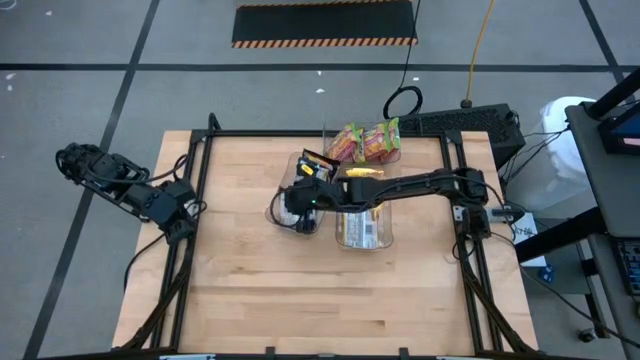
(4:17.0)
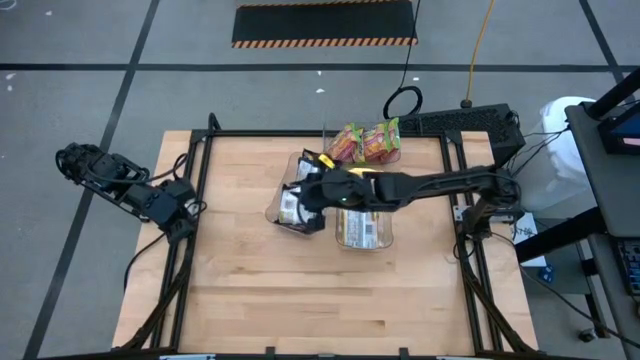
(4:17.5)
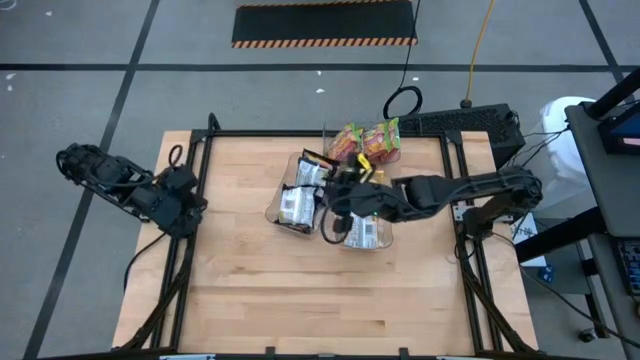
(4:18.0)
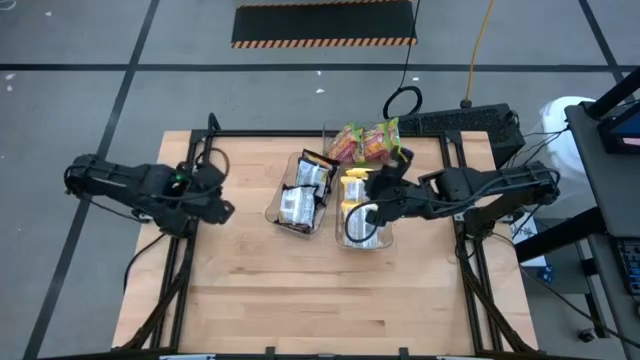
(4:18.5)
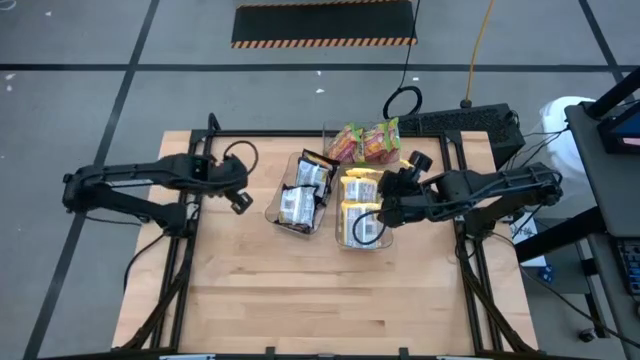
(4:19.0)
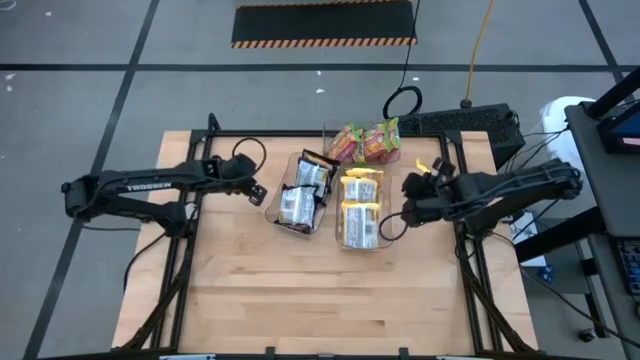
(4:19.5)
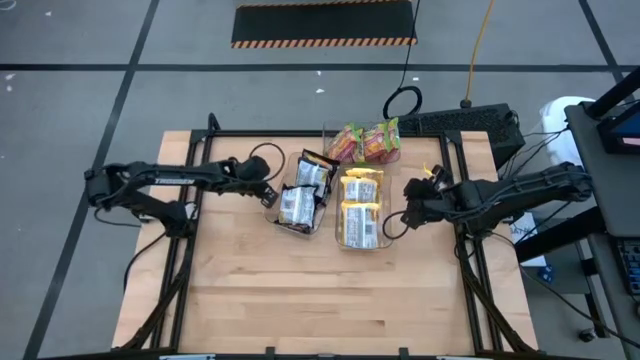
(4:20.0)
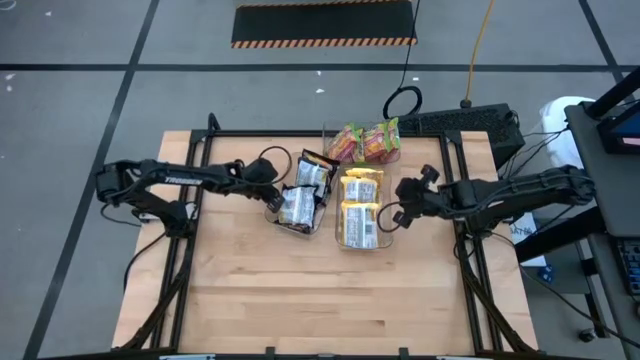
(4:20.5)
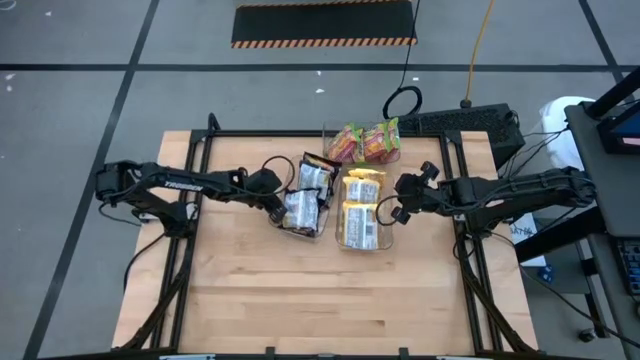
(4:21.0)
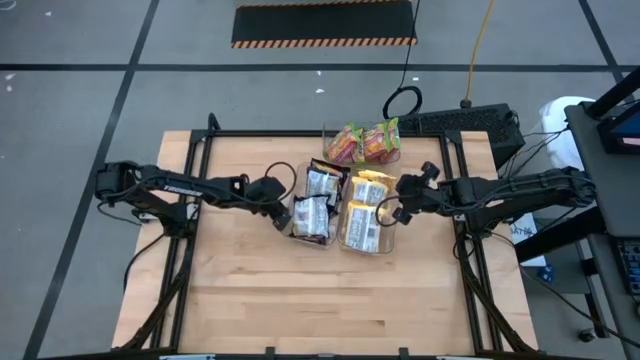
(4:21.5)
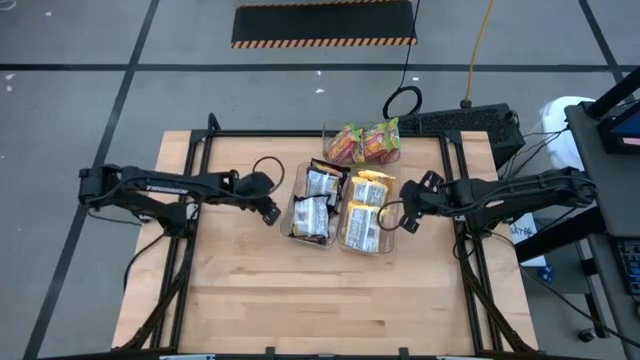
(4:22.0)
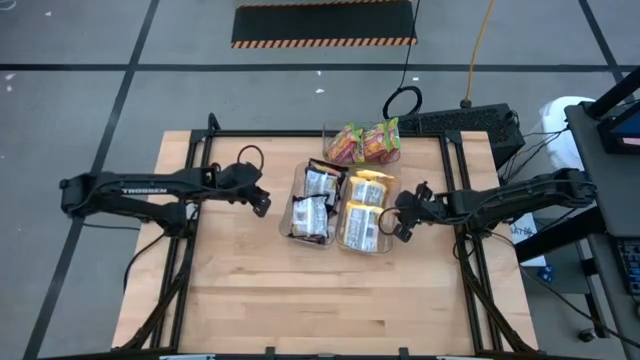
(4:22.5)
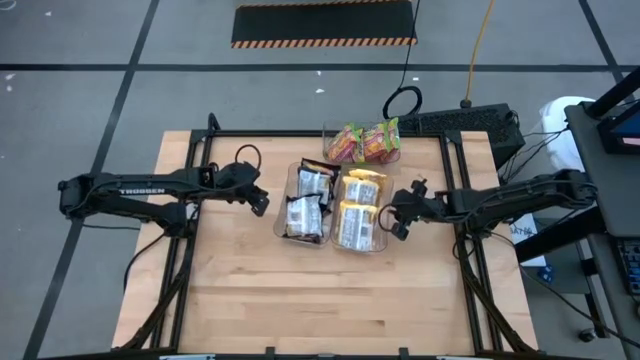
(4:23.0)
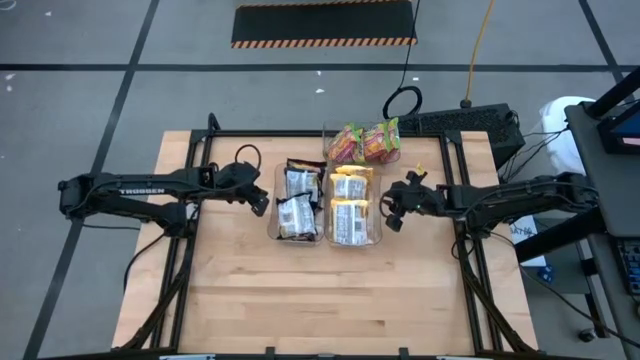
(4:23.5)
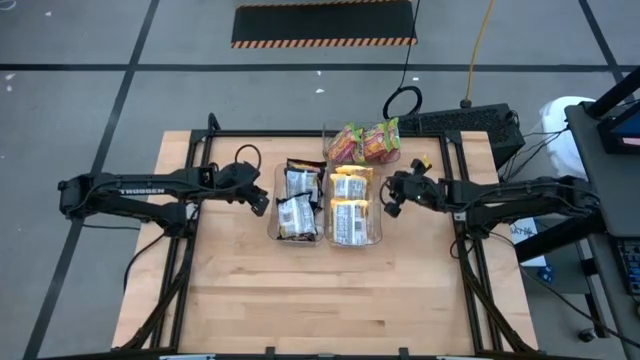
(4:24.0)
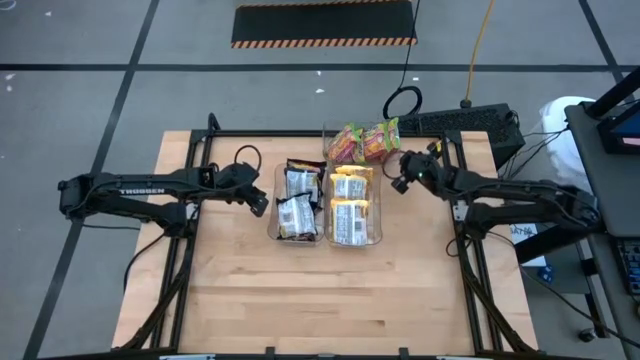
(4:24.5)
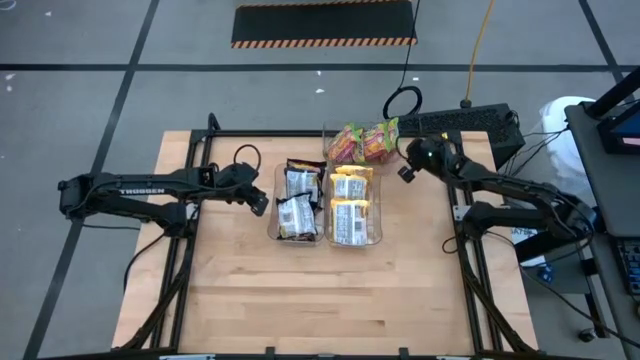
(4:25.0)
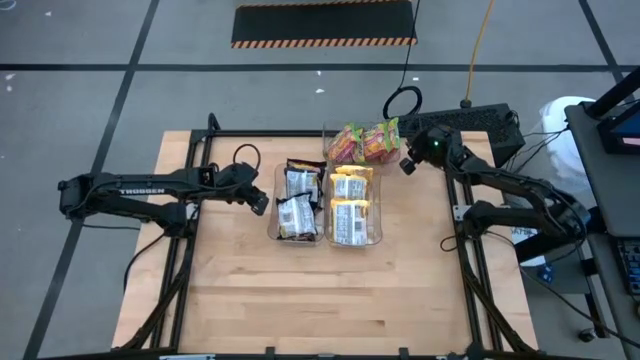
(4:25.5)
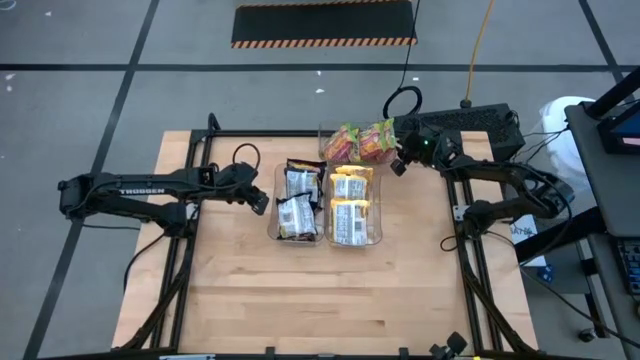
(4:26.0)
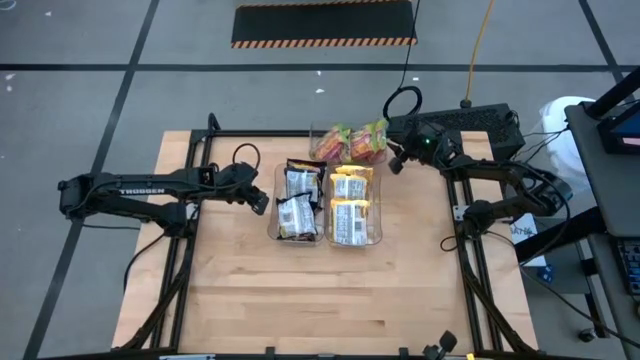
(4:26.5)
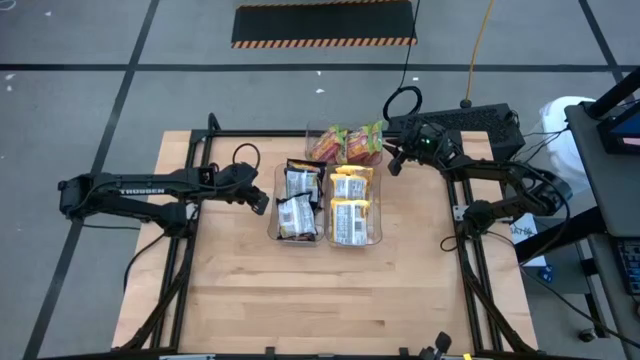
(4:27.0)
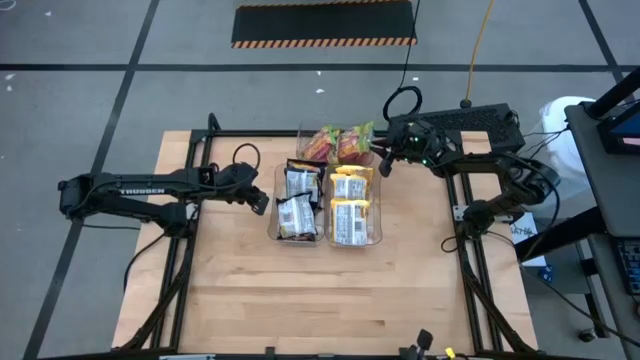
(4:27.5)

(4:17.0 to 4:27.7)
Task: Sort Maruchan noodles
Adjust the transparent bins on the shelf

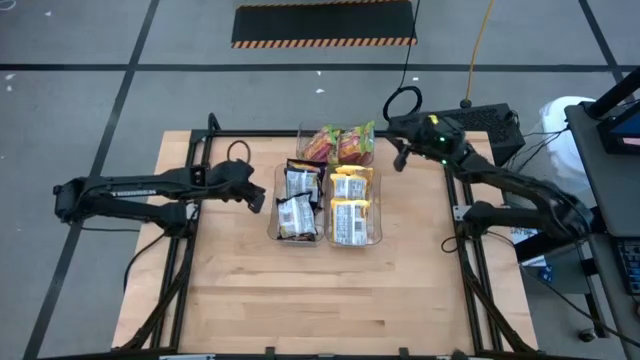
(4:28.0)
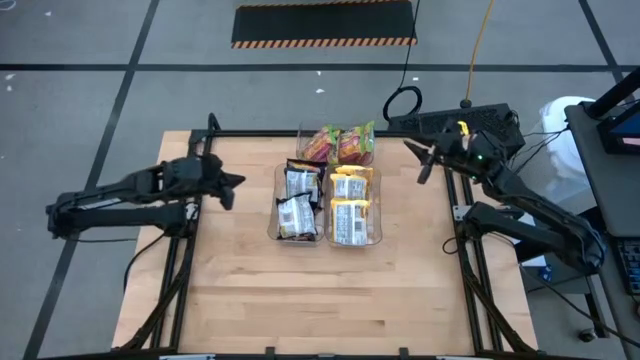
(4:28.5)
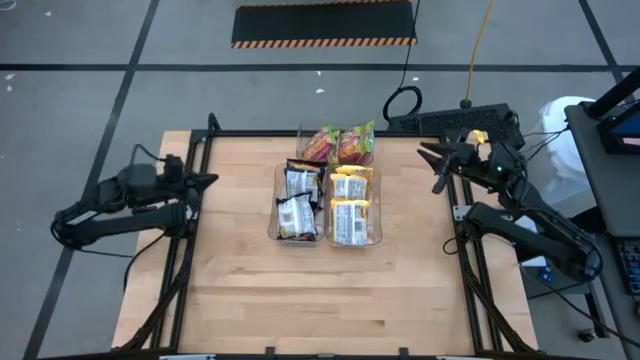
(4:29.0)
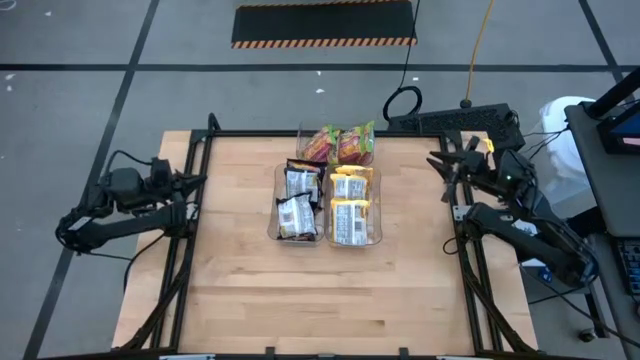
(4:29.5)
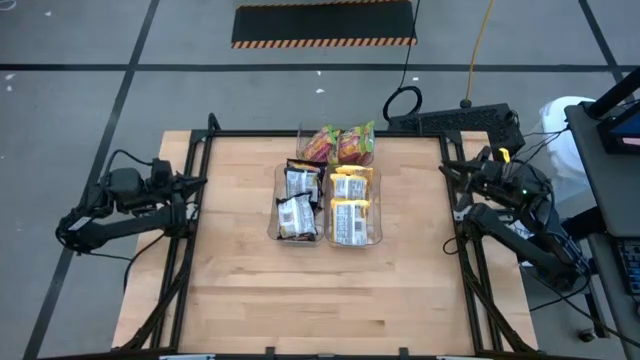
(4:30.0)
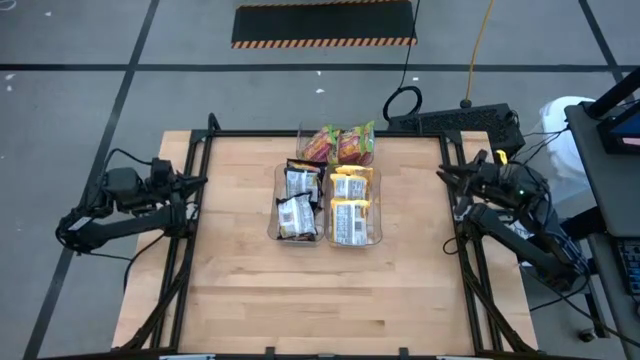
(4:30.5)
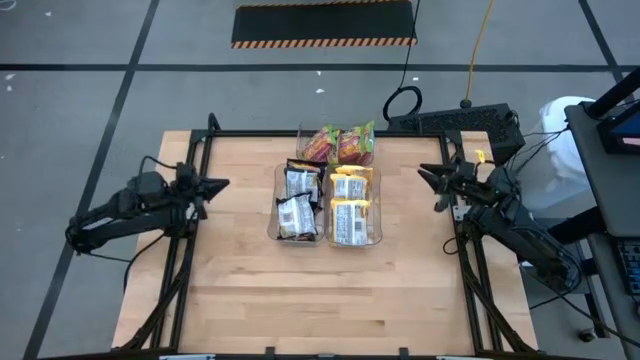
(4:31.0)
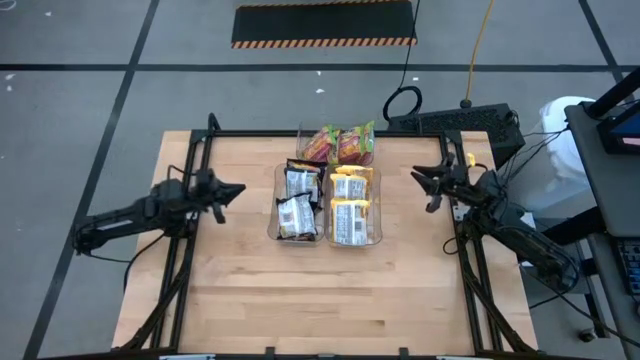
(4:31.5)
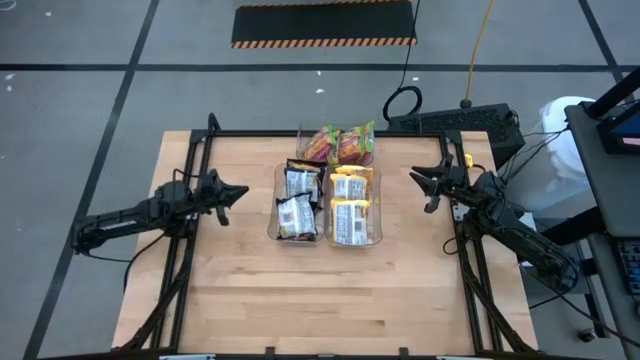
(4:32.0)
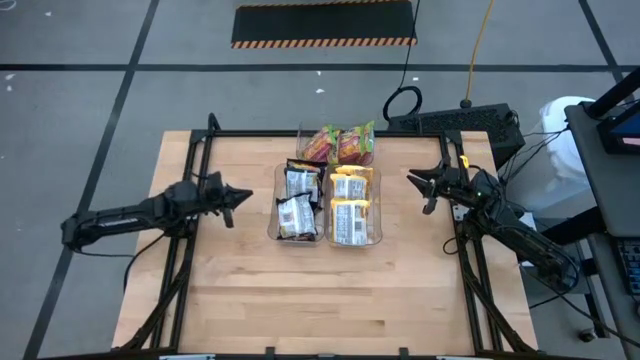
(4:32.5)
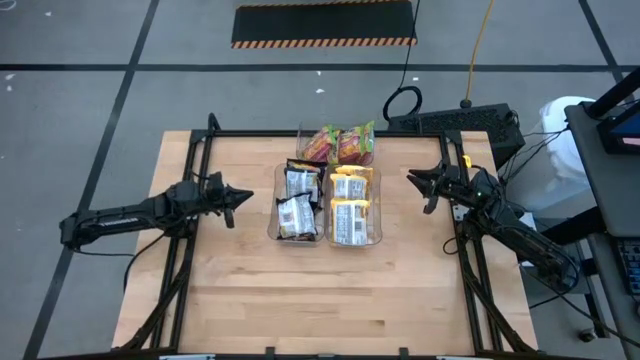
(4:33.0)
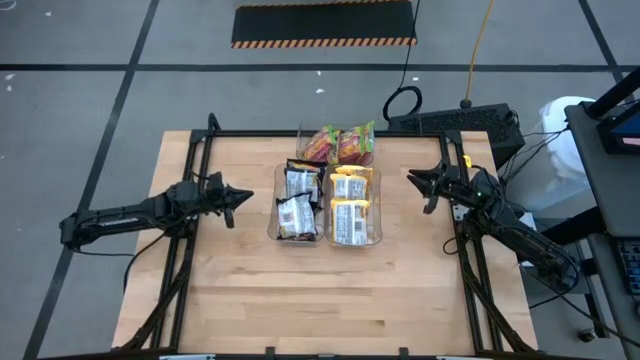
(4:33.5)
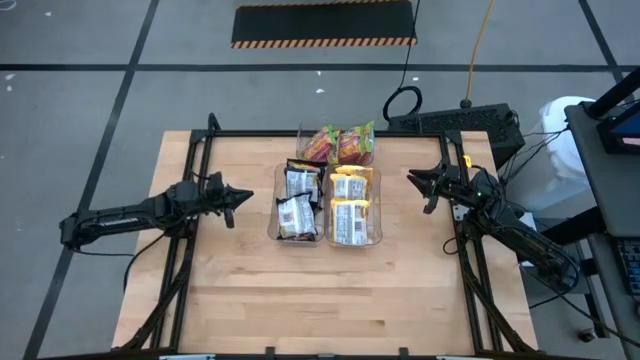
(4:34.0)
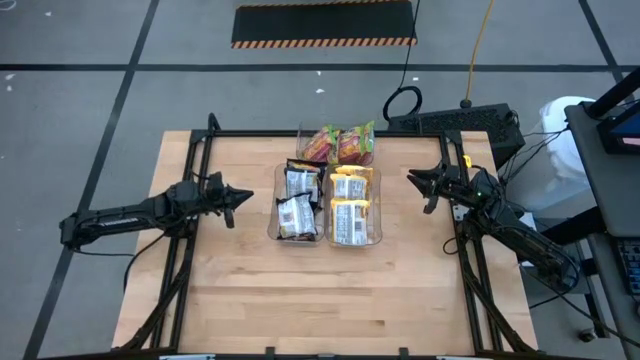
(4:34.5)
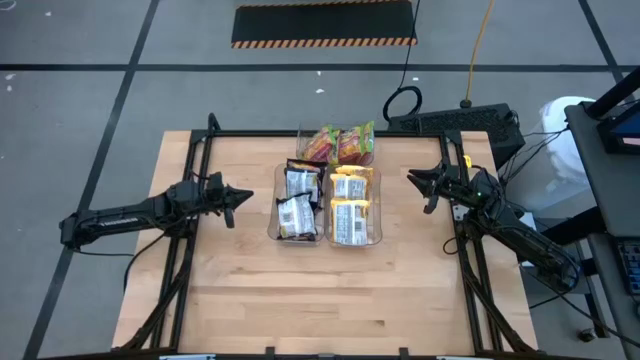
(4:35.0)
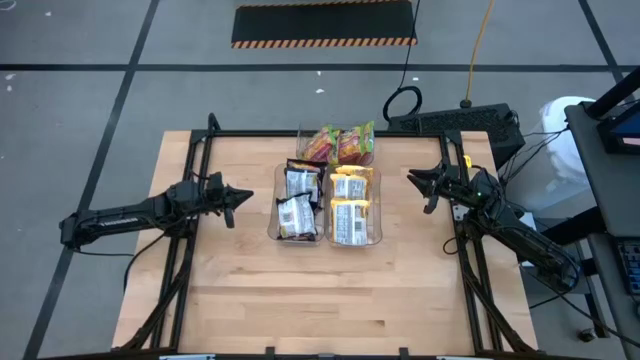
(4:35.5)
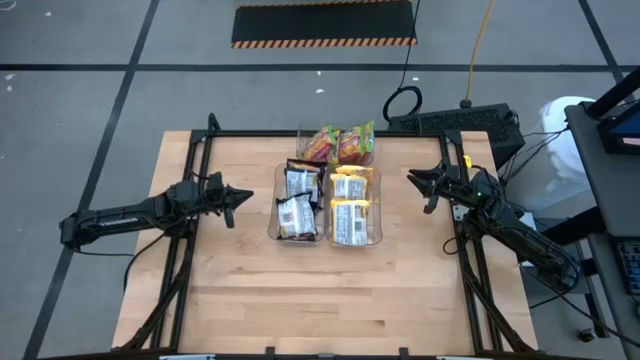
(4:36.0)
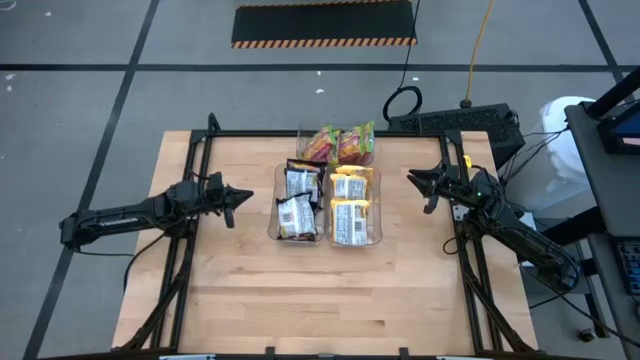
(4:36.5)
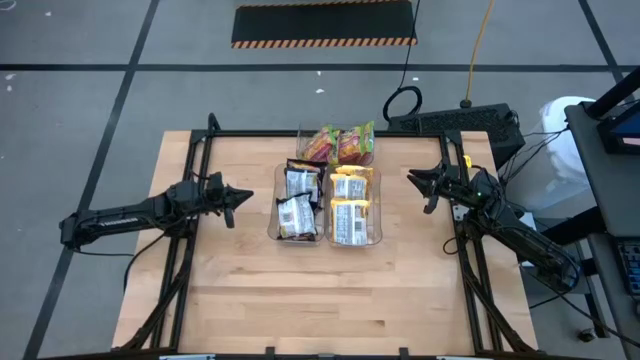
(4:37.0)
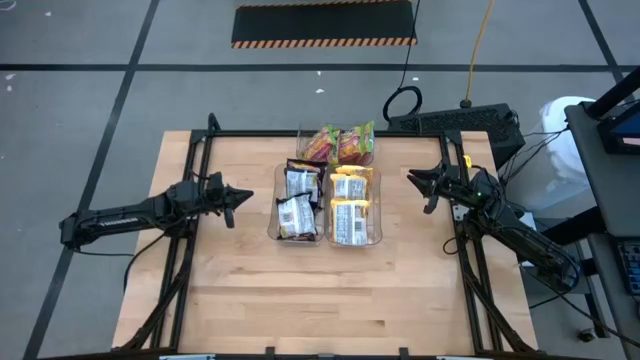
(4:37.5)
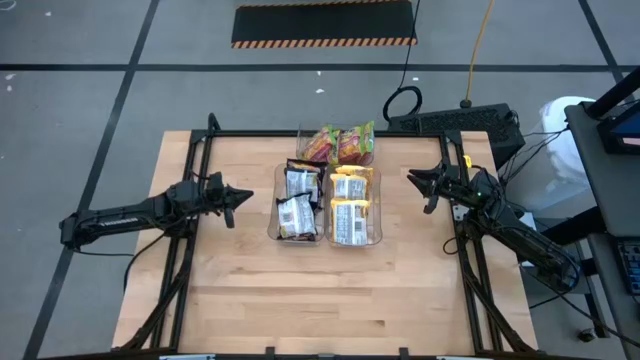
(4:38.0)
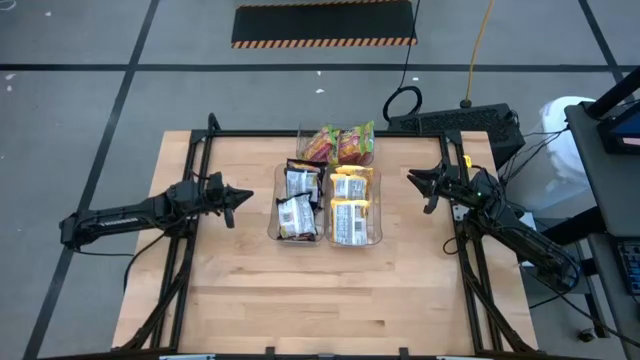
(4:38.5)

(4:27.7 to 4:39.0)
Return to Home Position
